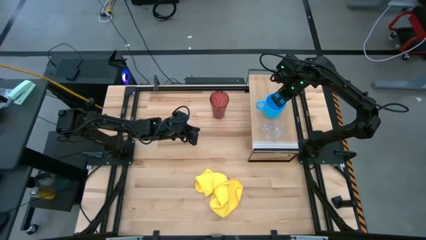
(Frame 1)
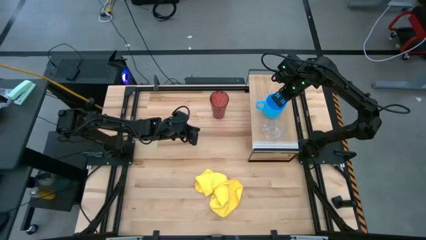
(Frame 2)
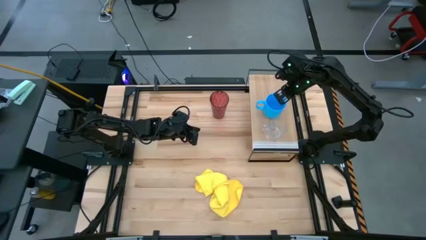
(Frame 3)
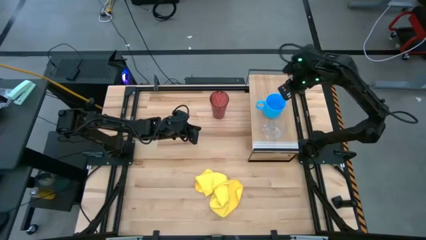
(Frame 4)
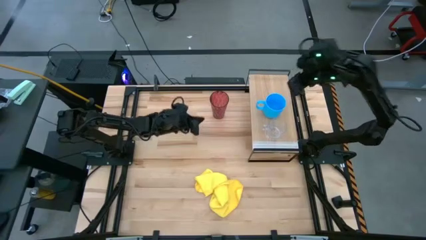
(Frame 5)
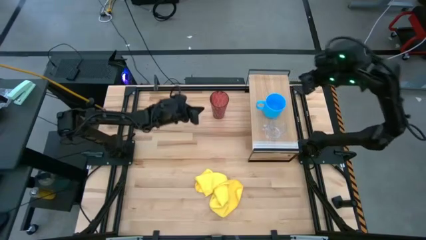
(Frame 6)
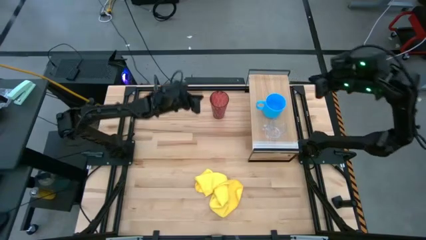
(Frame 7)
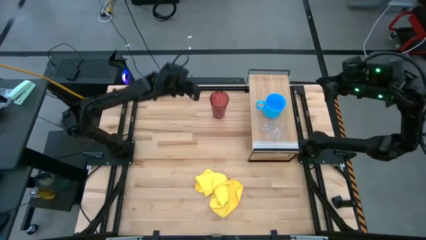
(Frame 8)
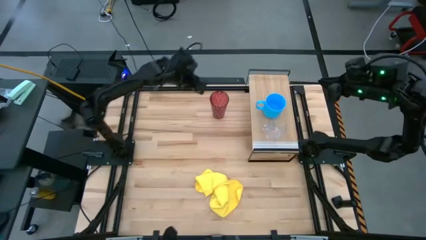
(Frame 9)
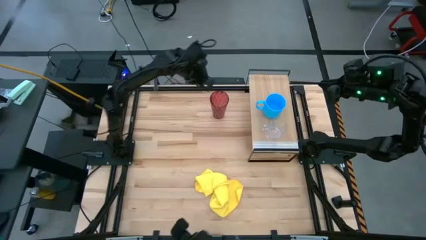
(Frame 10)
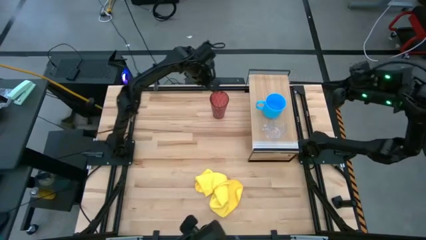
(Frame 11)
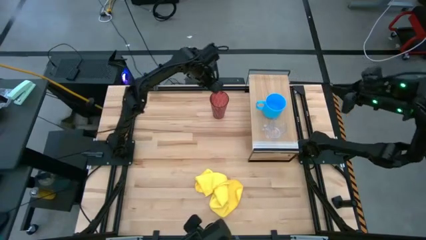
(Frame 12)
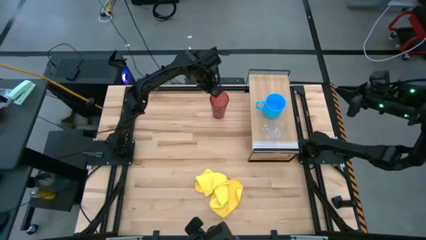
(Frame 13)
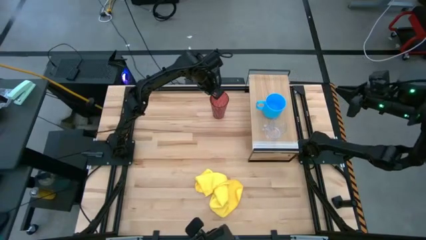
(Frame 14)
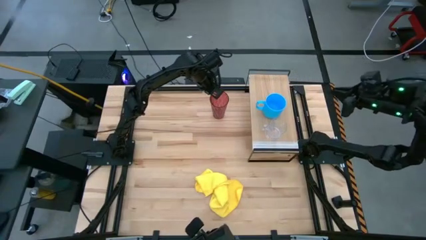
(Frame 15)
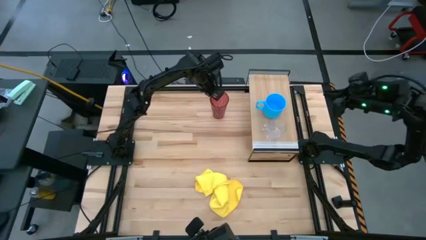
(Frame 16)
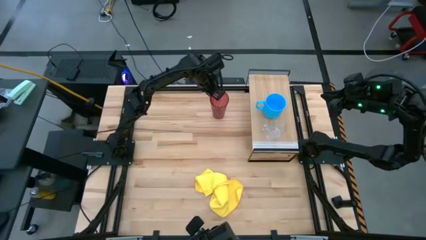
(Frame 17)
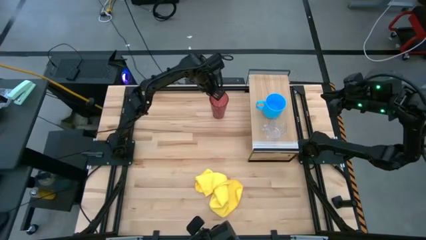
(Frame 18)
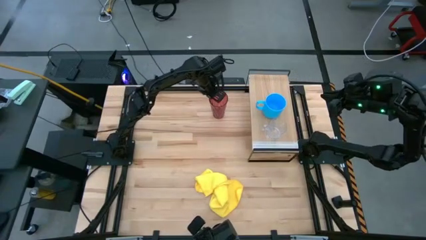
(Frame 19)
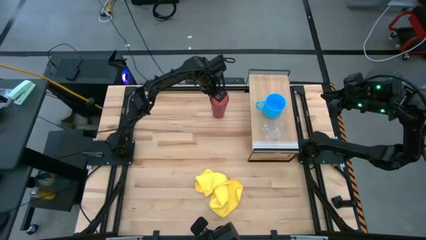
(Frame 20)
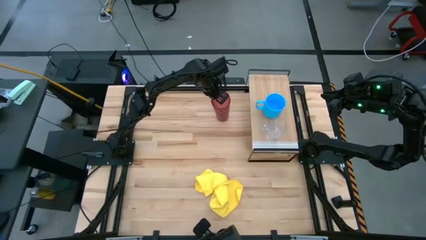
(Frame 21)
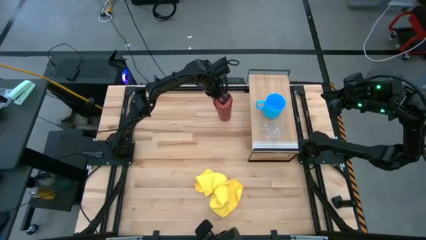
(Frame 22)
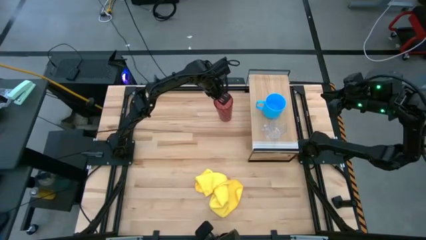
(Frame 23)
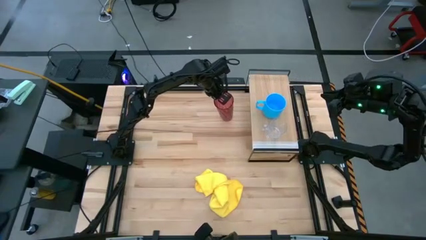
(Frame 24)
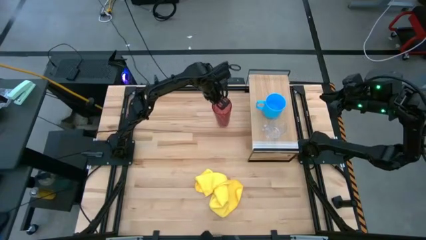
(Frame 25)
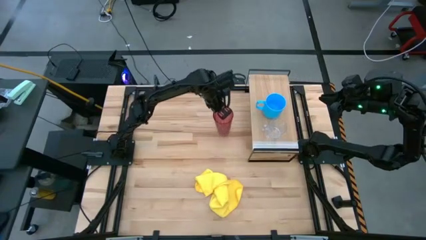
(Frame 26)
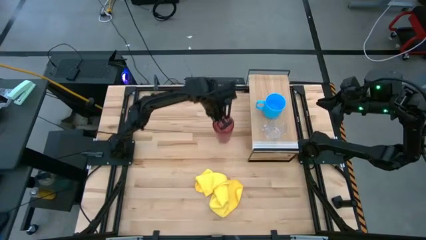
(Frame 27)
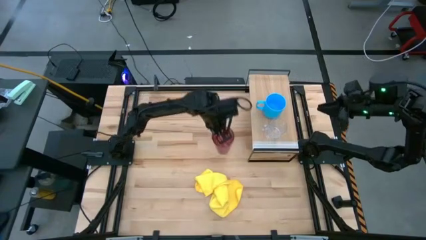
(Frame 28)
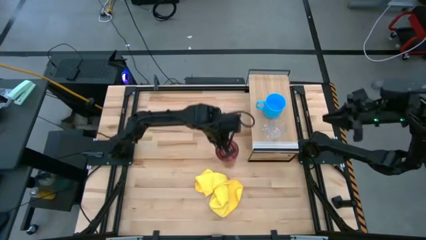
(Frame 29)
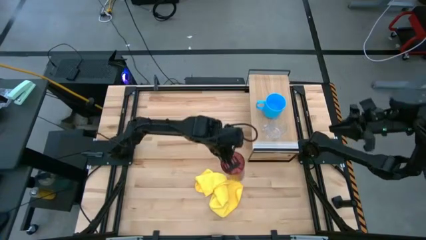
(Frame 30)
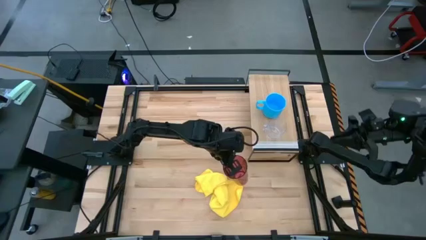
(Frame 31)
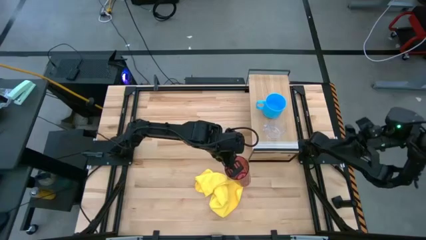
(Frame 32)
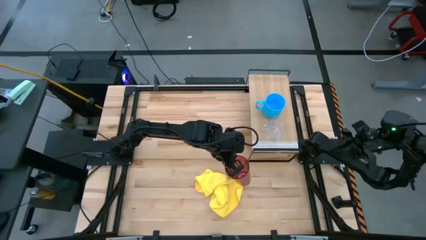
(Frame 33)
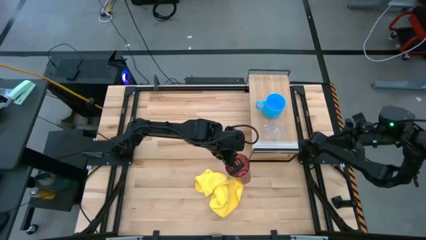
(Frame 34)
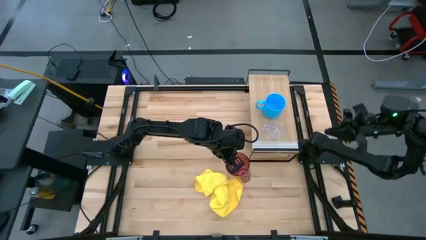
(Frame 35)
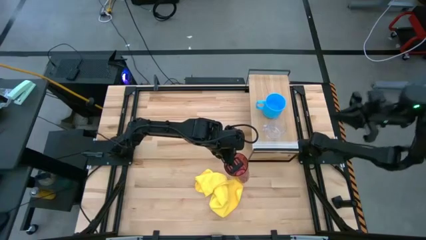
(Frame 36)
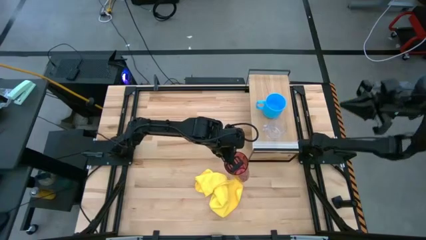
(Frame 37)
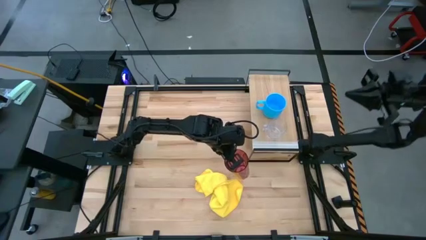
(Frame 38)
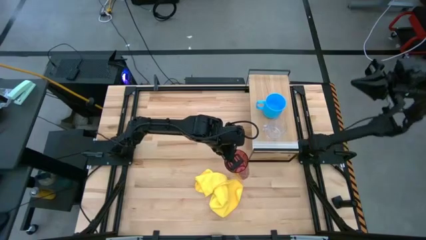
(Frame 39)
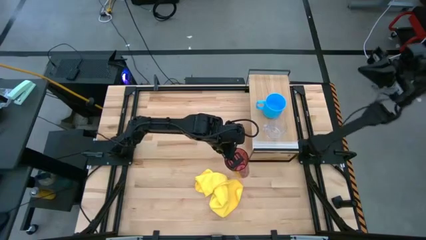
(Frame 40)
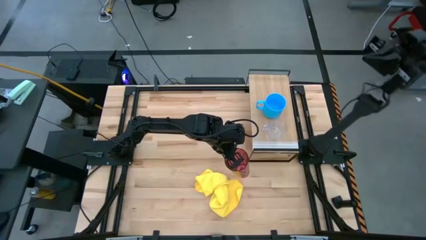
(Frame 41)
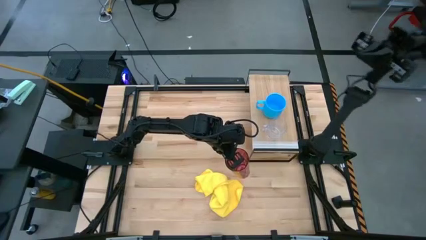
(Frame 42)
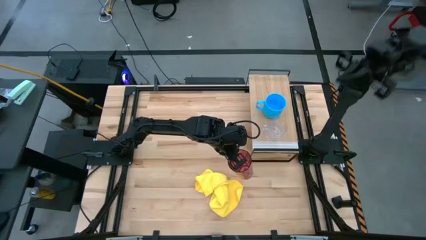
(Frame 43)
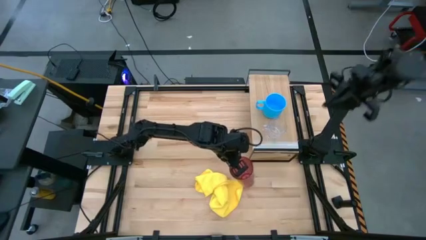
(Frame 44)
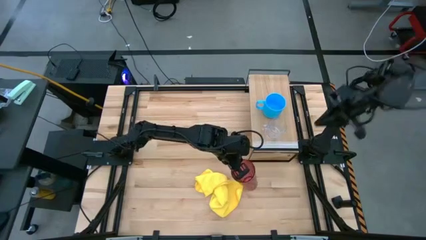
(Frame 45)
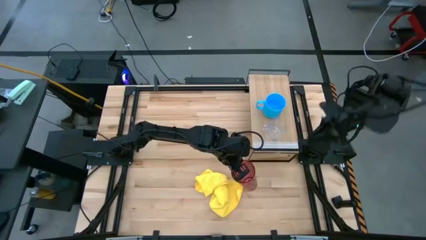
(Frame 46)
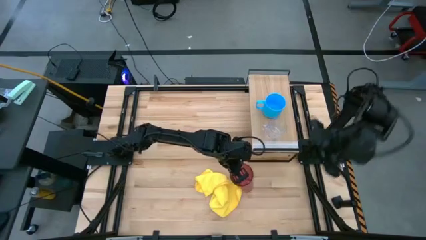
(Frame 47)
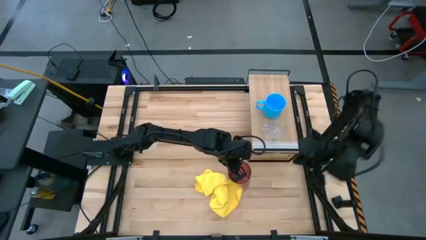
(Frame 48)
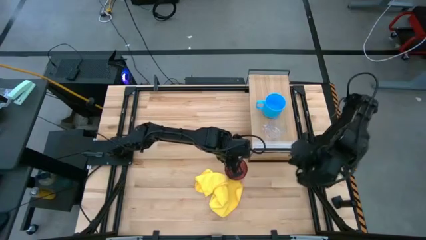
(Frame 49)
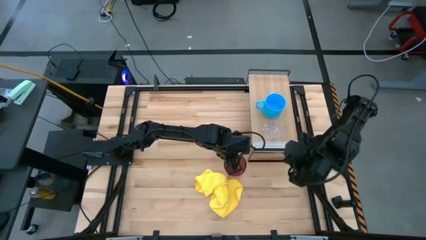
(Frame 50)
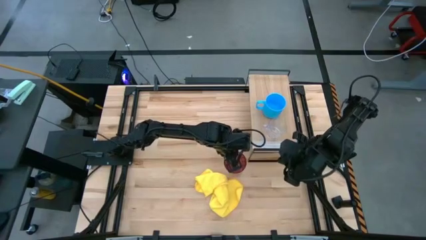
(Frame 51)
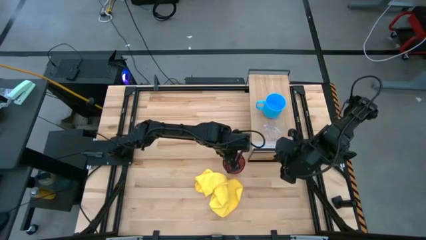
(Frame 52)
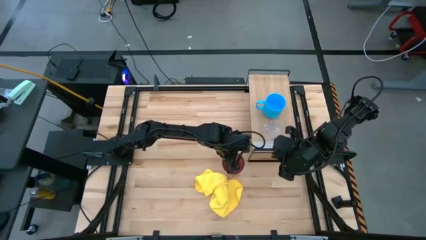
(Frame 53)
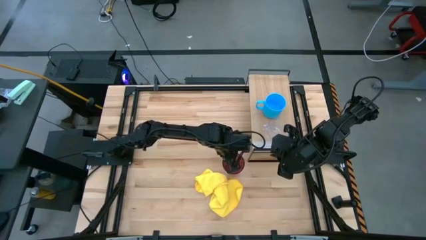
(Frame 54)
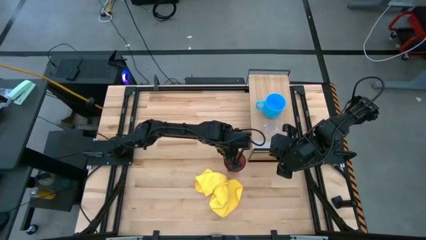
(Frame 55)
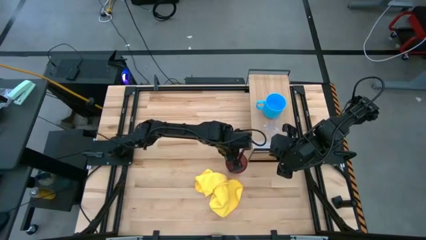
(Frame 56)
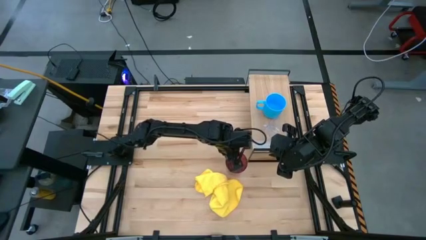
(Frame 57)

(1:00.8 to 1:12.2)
Task: Stack small to large cups/mugs on shelf
Put the red cup on the shelf
